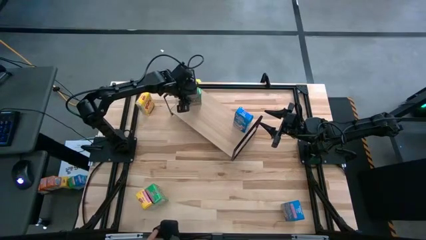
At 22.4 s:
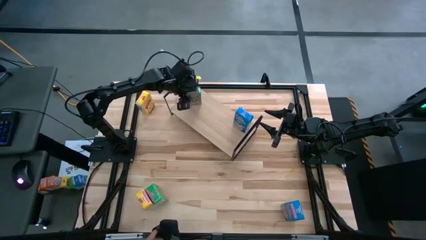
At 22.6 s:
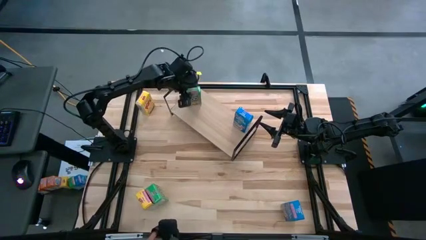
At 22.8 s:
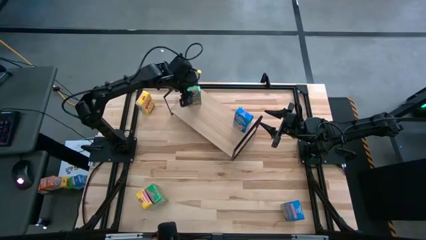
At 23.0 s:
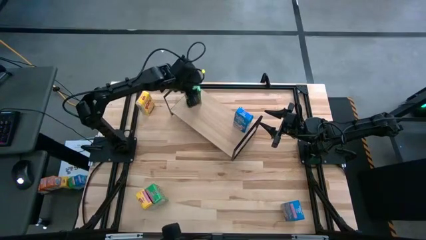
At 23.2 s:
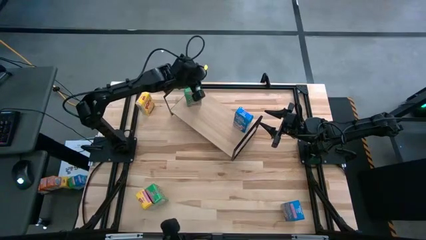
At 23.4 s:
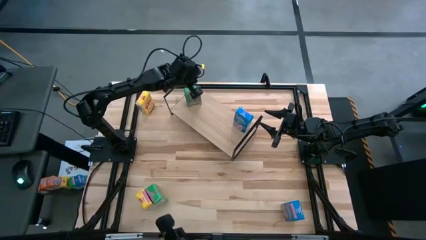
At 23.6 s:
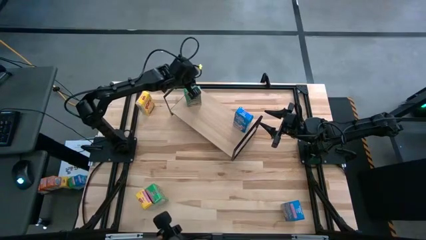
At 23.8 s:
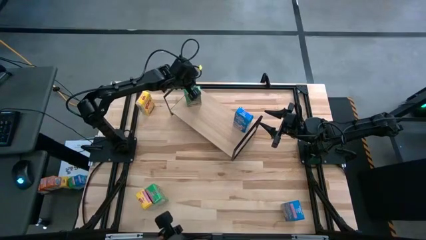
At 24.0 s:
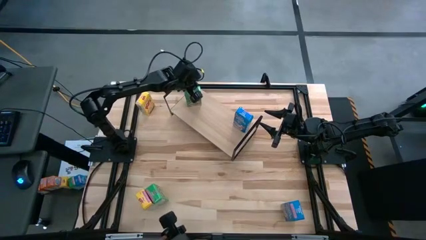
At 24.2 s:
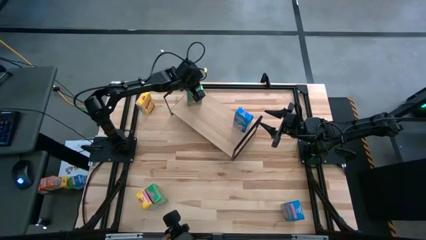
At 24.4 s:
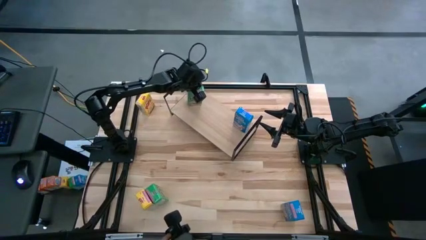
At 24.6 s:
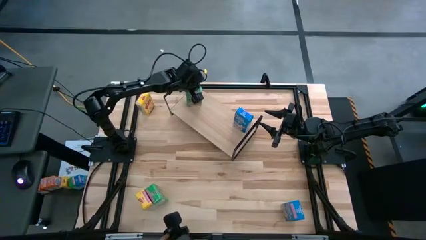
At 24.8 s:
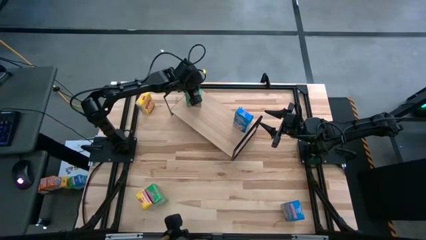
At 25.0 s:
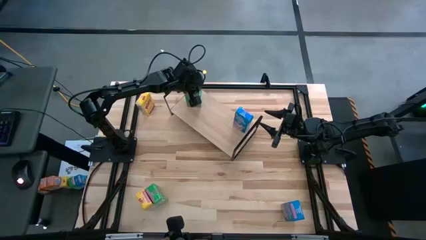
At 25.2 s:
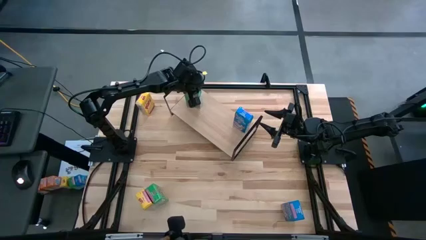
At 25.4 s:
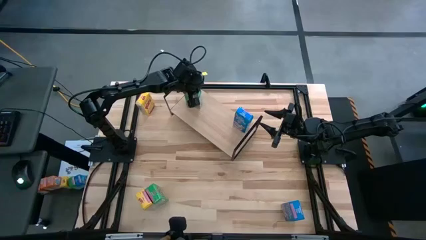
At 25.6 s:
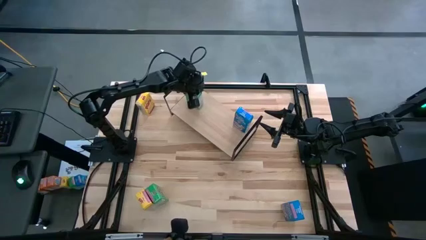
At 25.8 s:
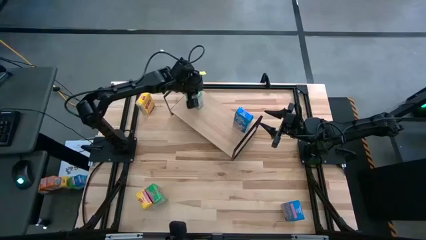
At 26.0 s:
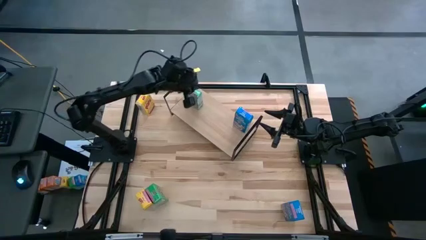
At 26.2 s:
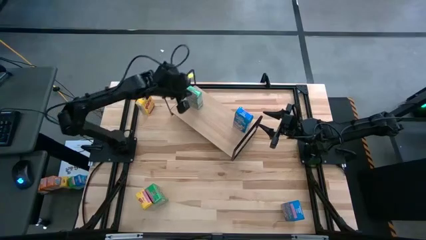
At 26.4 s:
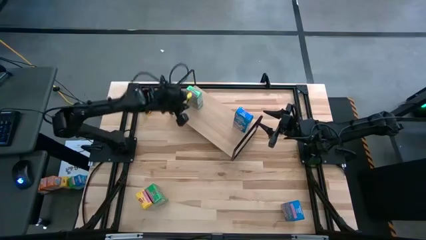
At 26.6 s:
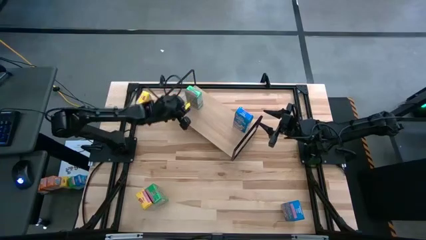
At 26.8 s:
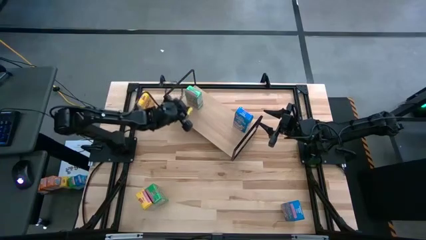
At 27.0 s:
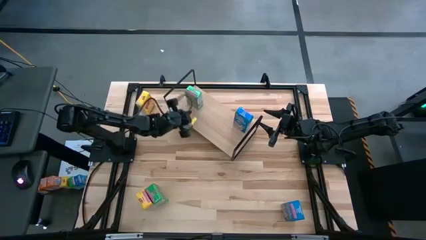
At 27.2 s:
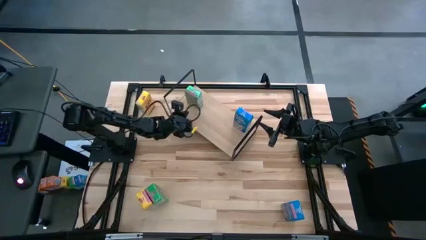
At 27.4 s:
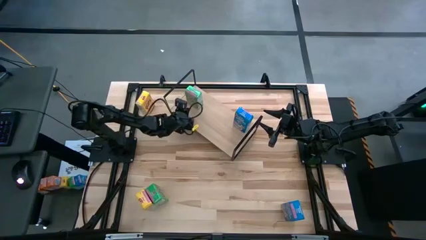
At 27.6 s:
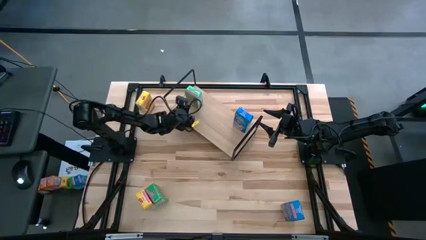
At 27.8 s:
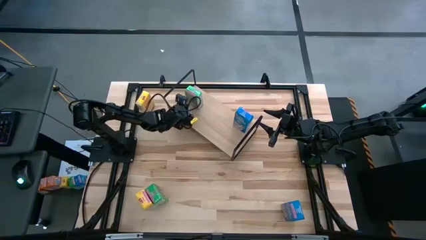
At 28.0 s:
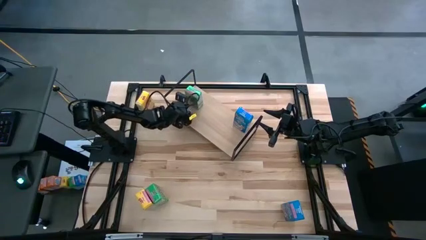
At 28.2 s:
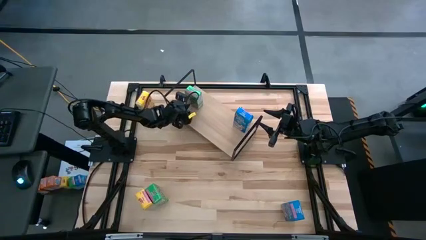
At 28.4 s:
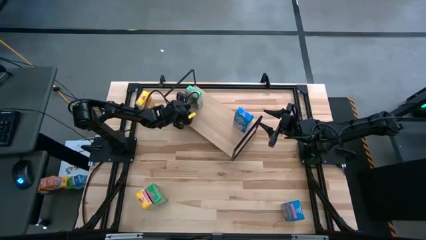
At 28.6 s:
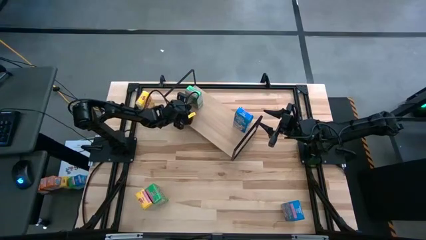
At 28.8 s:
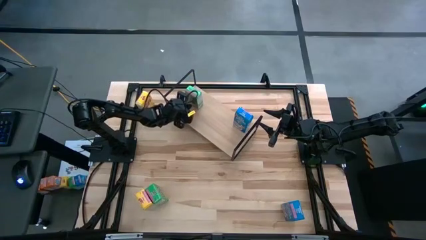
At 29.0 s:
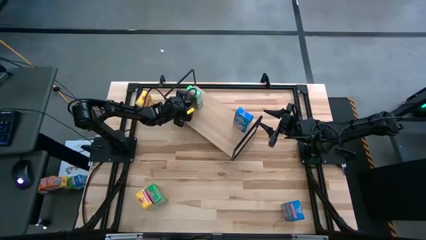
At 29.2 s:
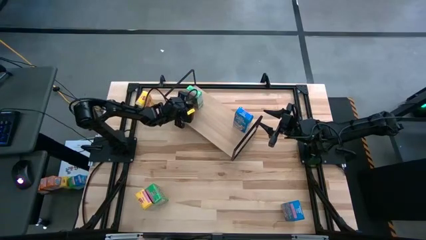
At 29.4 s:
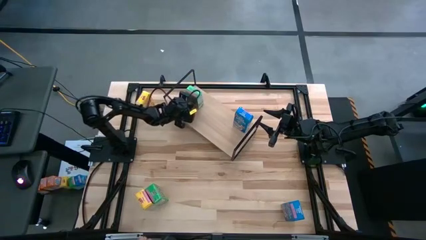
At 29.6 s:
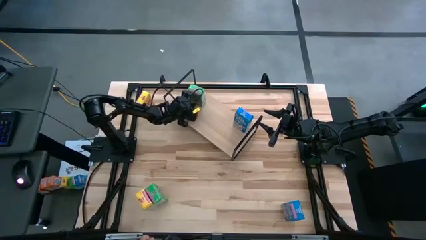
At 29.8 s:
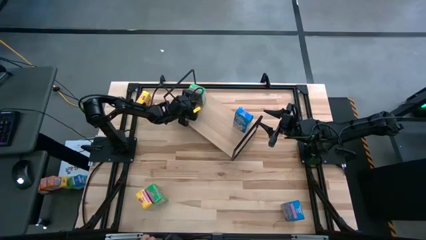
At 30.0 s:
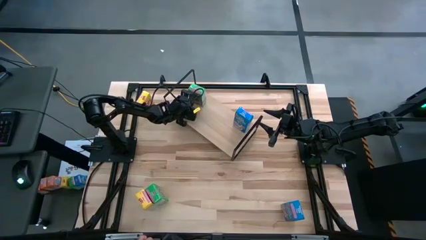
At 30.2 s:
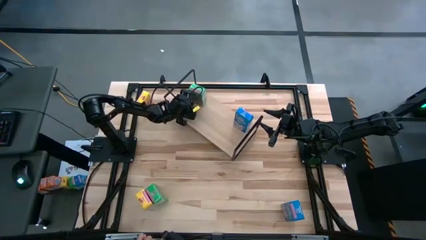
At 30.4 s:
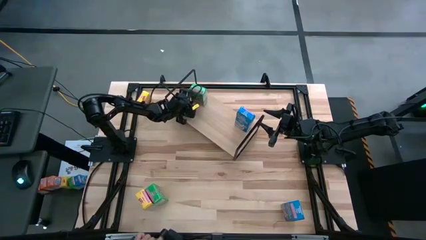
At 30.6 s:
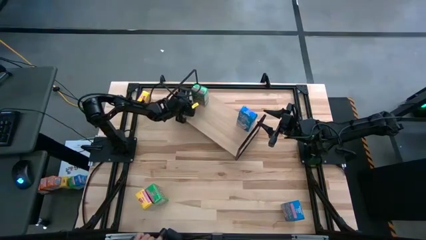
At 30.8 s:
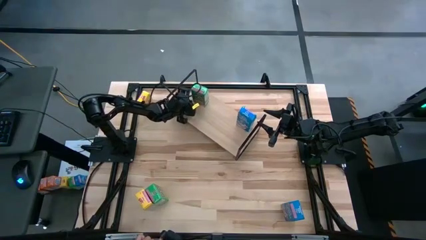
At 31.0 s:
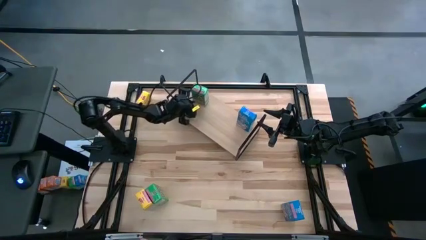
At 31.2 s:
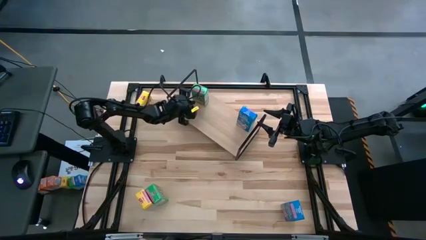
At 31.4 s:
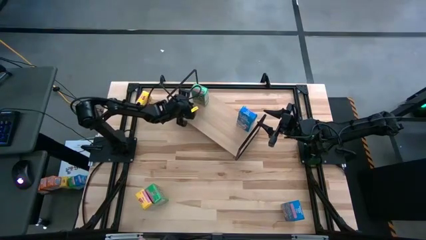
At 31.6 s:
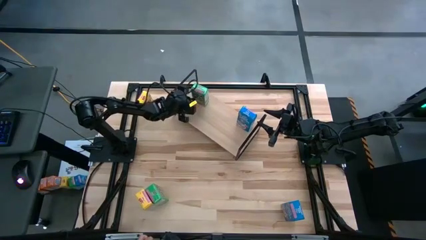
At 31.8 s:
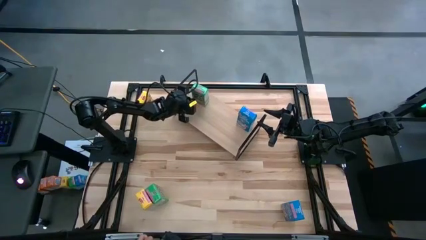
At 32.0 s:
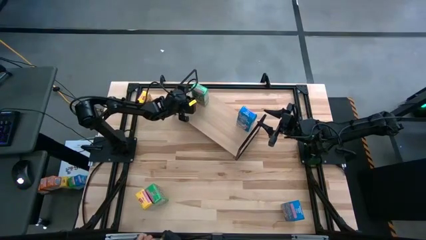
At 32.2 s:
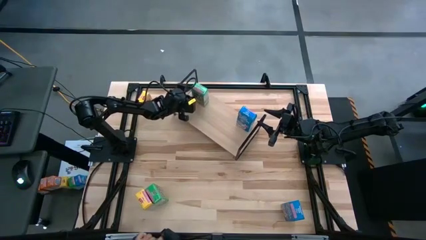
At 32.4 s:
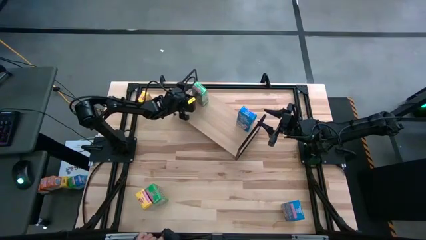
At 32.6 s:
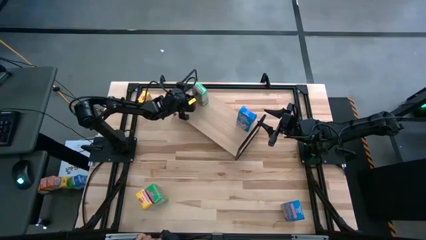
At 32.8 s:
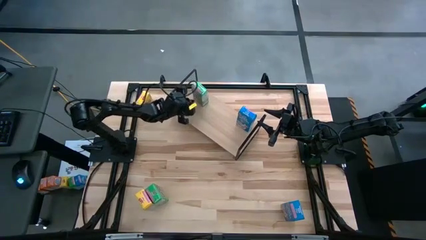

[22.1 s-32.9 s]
Task: Stack cereal on shelf
Put the top green cereal box on the shelf

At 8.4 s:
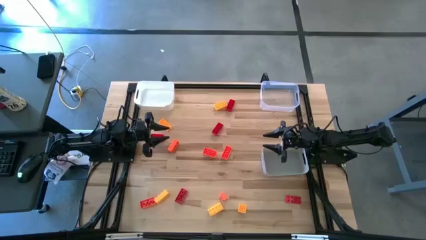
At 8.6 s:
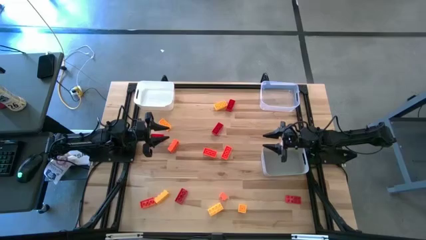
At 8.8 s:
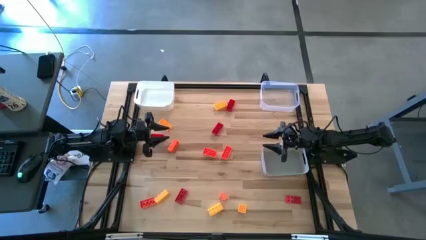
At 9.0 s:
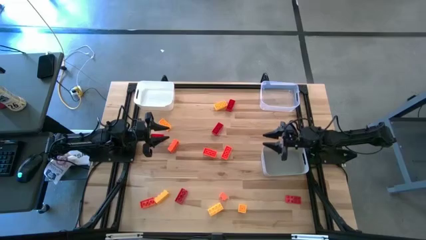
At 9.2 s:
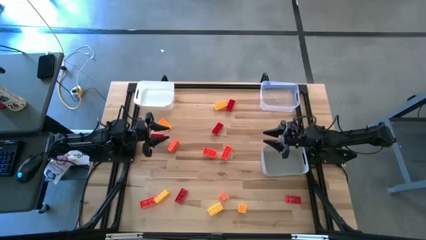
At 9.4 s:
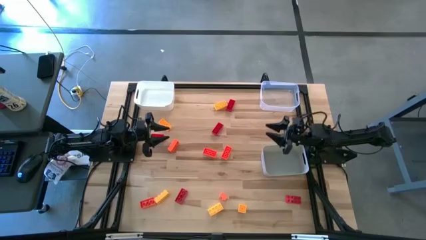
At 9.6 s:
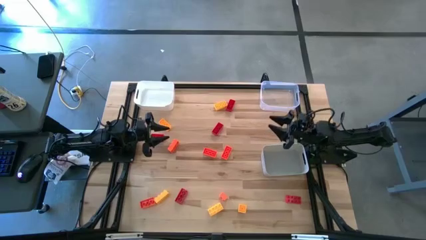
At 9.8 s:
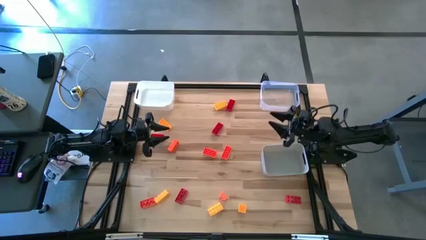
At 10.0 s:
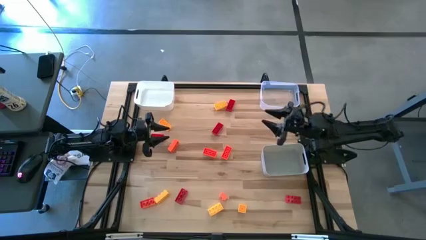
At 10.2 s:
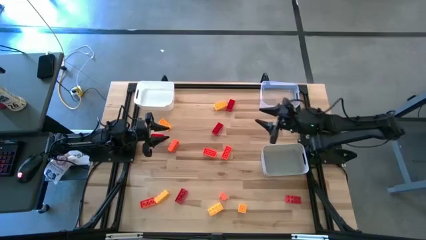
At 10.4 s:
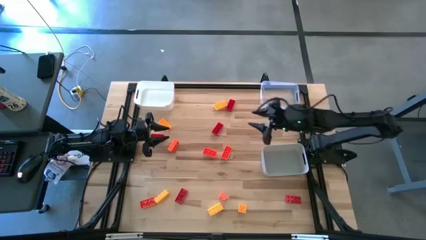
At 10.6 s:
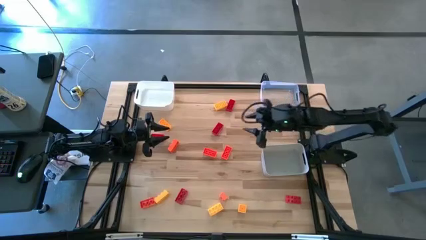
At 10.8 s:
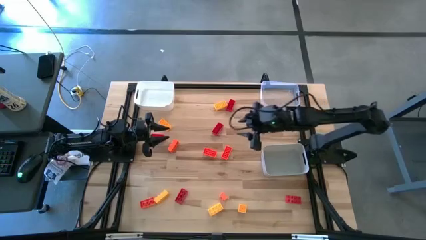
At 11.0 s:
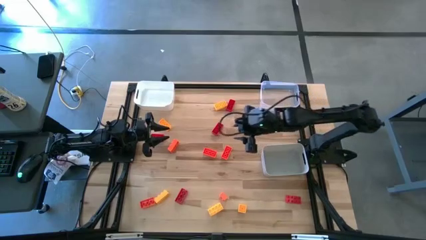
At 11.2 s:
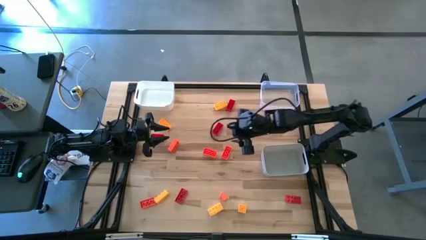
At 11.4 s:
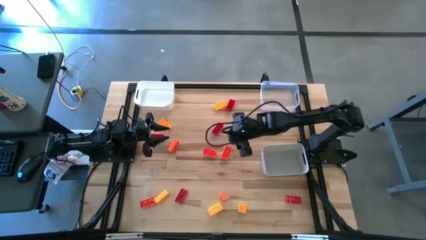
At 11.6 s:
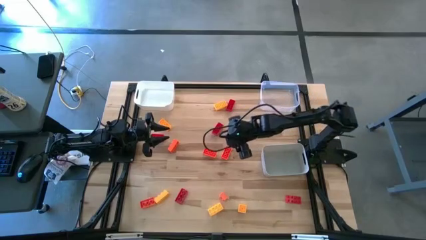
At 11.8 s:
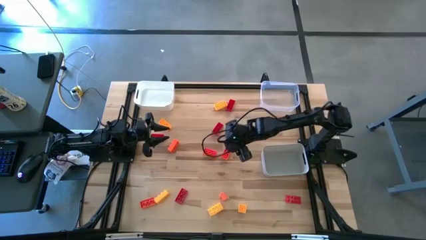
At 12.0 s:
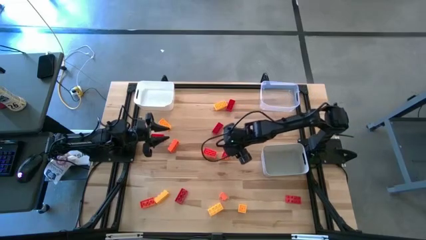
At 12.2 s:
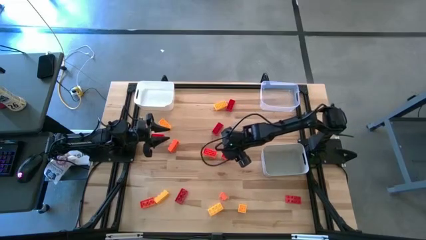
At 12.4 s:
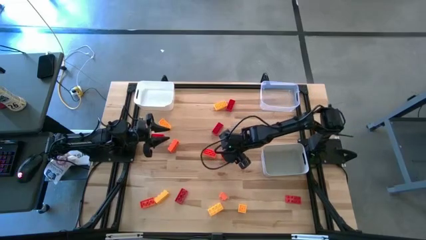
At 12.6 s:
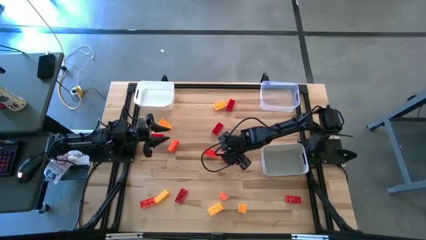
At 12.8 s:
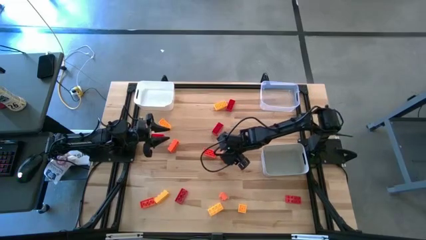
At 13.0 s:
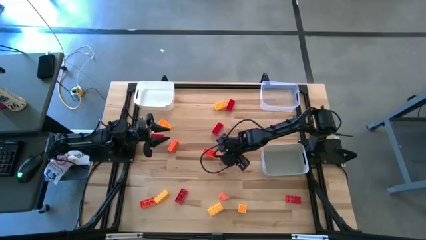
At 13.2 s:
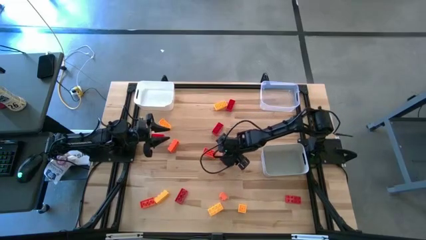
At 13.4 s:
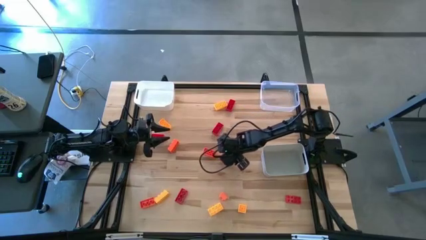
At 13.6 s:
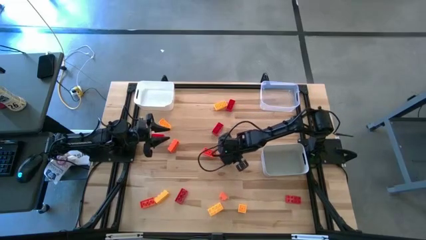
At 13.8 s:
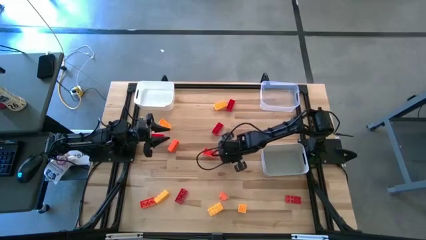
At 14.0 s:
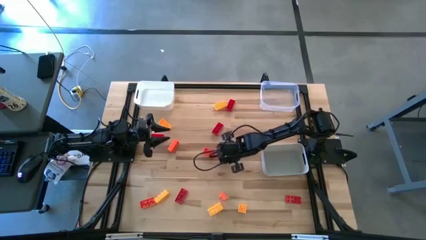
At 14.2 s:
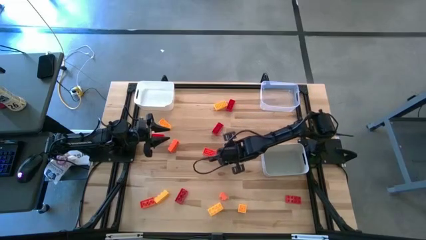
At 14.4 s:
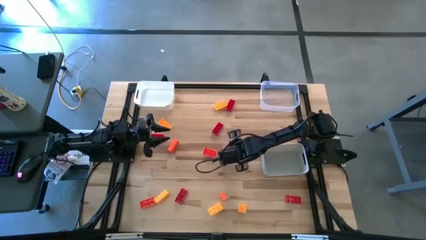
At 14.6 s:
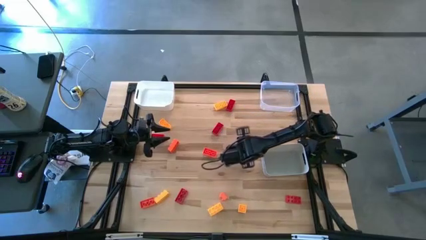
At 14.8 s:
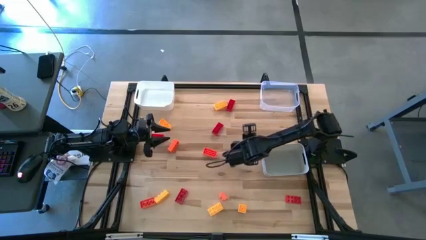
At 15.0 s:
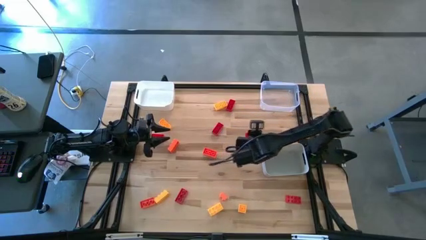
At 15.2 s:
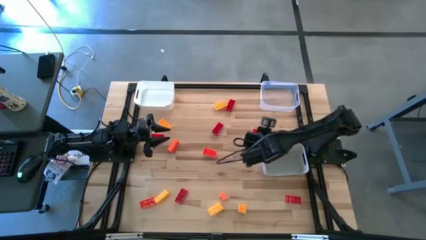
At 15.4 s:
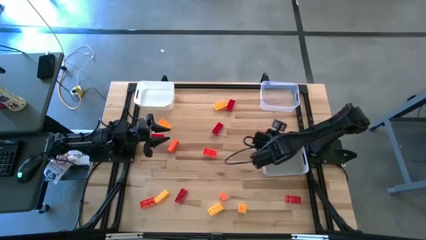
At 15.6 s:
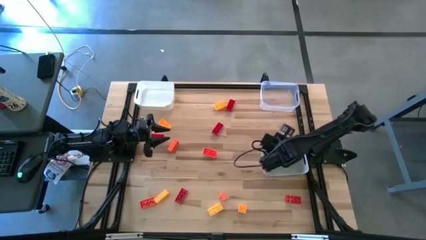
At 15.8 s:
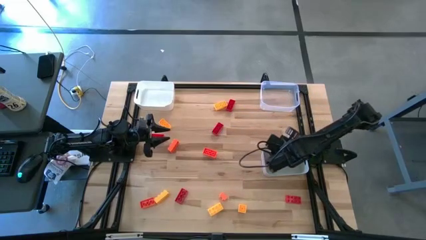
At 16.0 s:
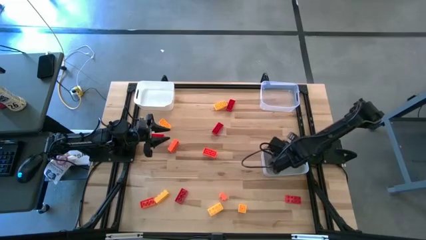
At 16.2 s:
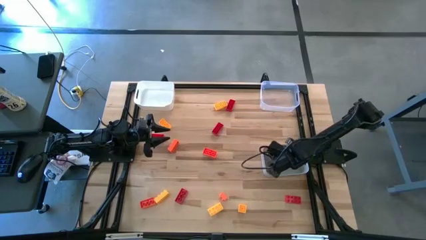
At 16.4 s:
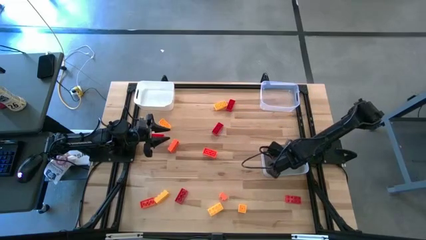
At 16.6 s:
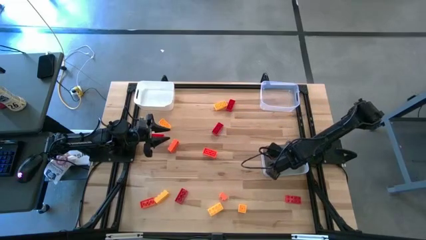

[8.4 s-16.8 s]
Task: Sort & place blocks by color
Put the orange game piece into the gray bin
